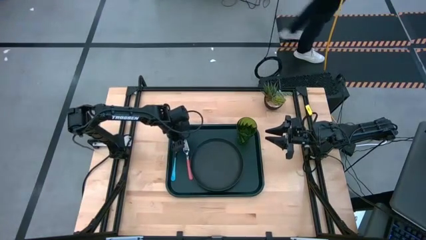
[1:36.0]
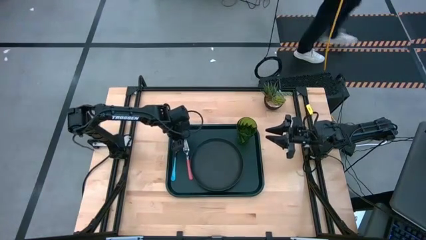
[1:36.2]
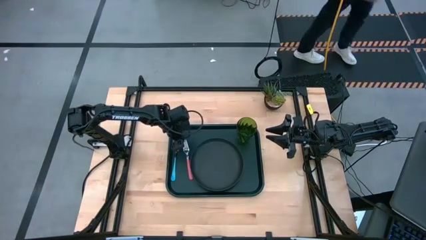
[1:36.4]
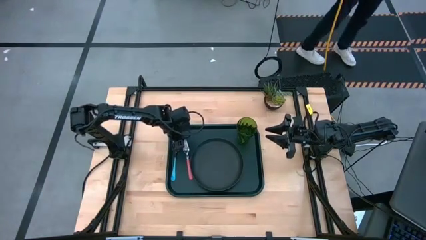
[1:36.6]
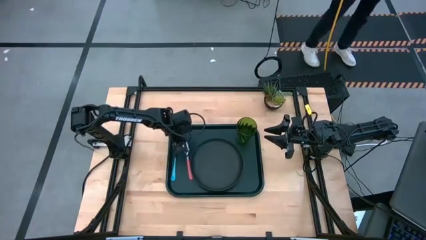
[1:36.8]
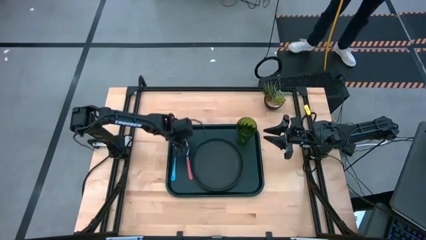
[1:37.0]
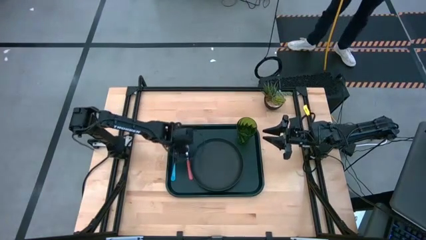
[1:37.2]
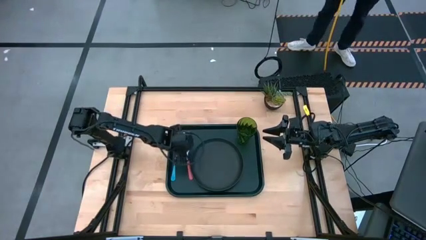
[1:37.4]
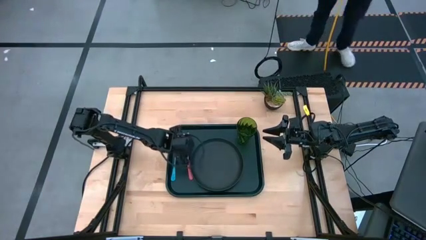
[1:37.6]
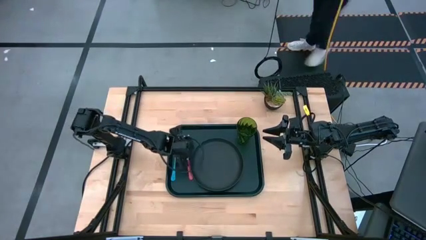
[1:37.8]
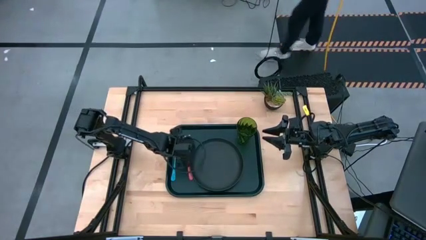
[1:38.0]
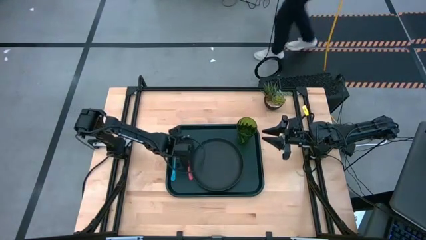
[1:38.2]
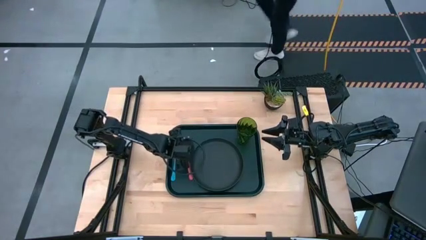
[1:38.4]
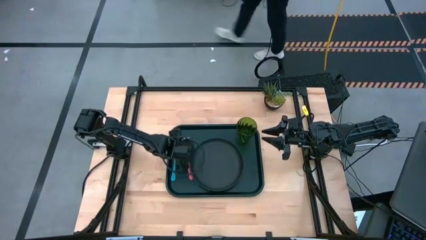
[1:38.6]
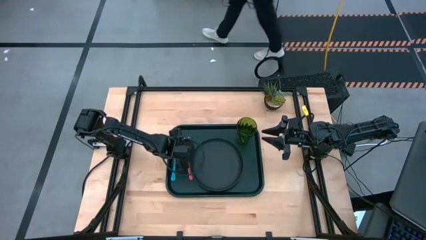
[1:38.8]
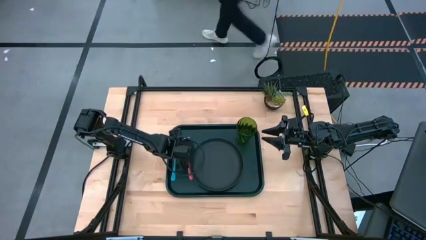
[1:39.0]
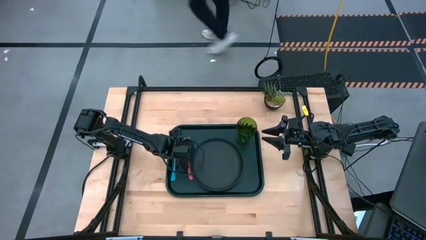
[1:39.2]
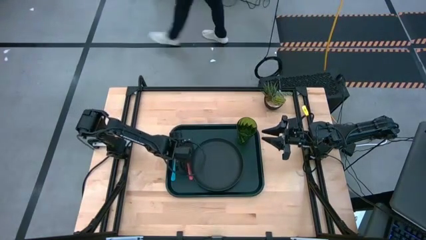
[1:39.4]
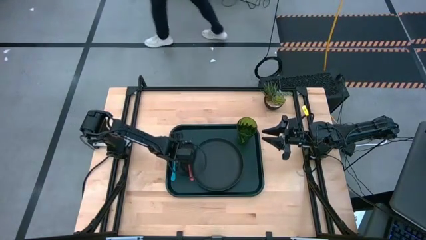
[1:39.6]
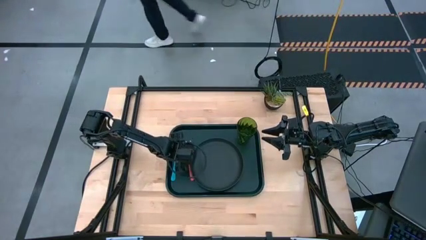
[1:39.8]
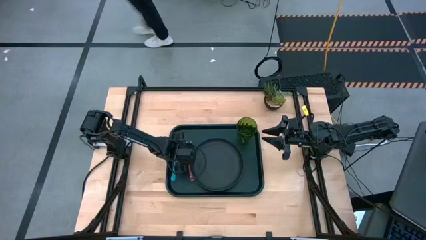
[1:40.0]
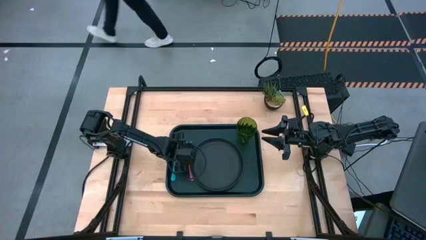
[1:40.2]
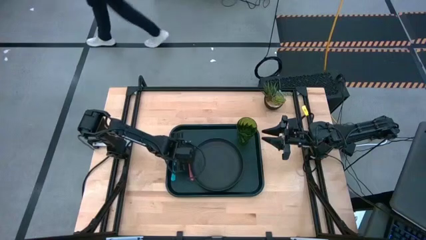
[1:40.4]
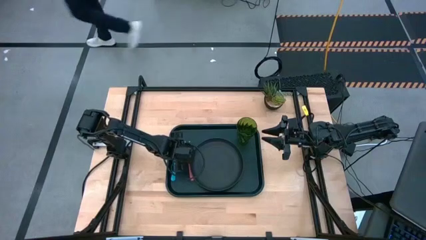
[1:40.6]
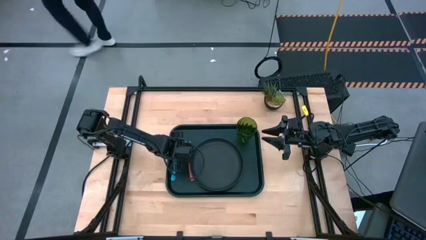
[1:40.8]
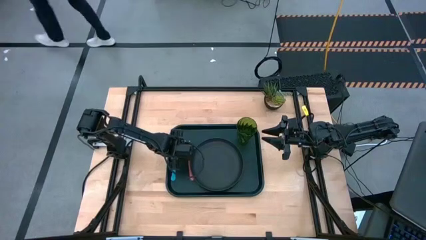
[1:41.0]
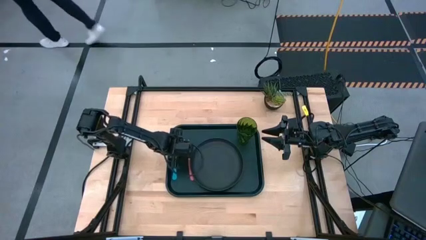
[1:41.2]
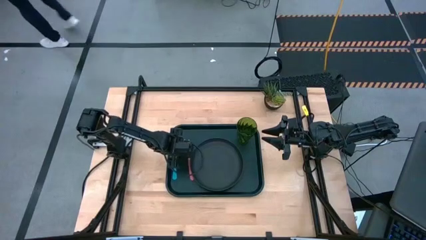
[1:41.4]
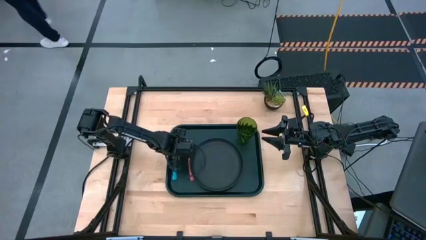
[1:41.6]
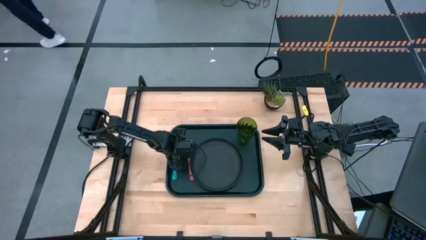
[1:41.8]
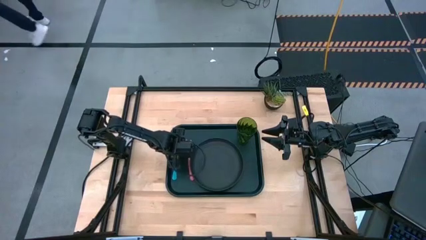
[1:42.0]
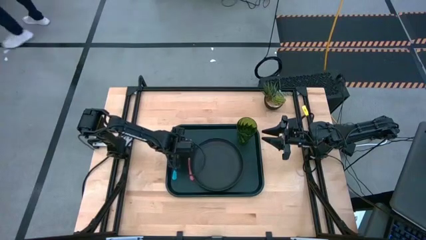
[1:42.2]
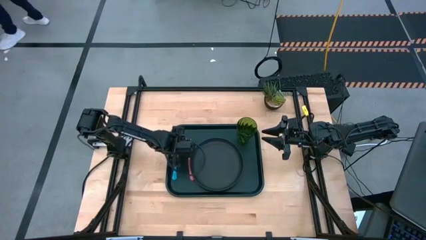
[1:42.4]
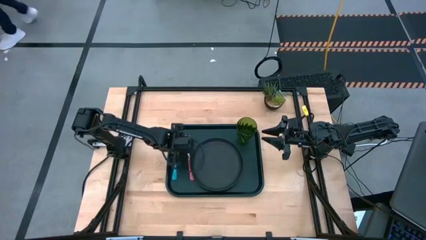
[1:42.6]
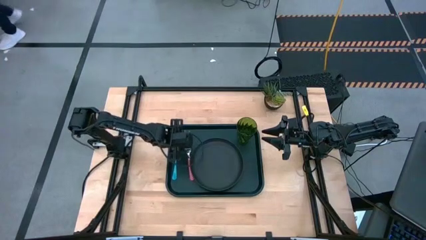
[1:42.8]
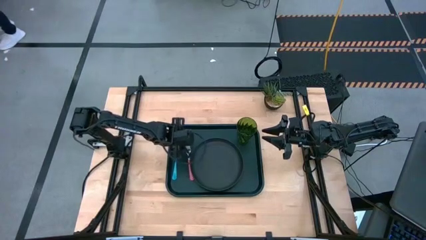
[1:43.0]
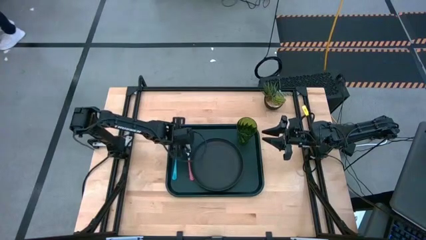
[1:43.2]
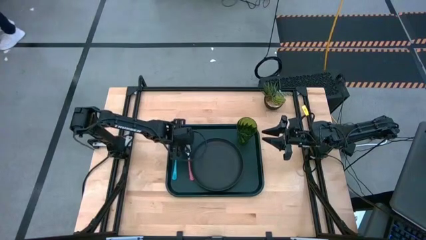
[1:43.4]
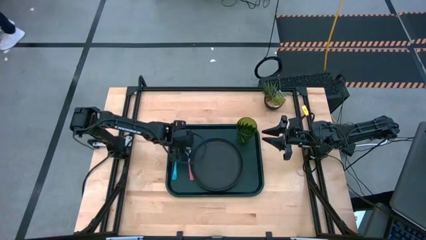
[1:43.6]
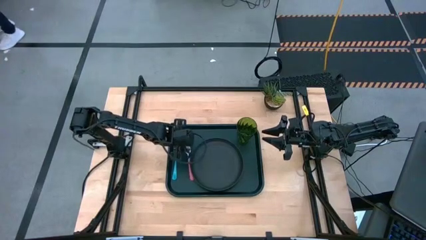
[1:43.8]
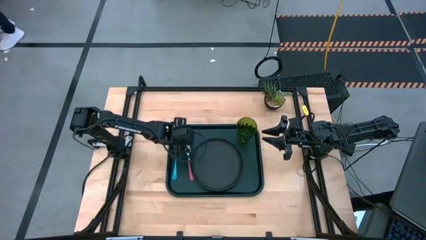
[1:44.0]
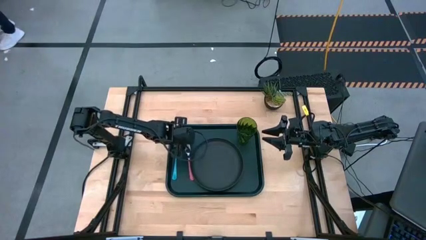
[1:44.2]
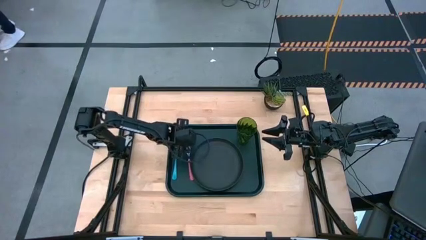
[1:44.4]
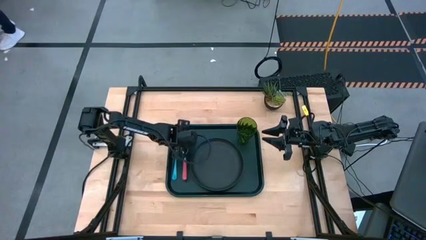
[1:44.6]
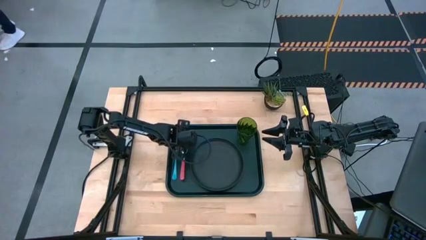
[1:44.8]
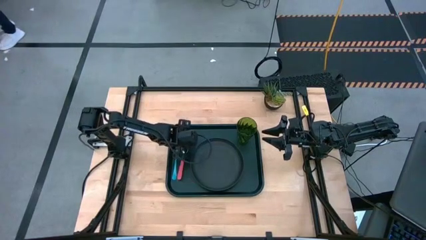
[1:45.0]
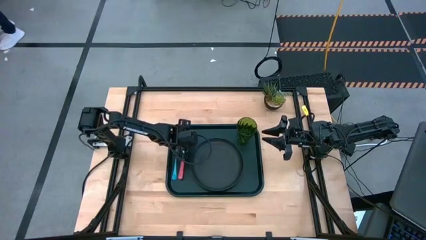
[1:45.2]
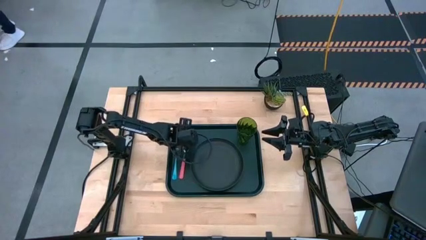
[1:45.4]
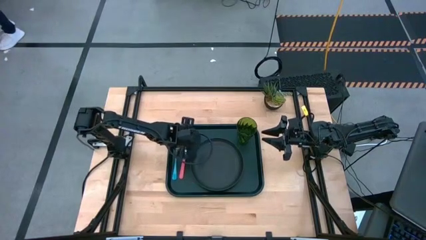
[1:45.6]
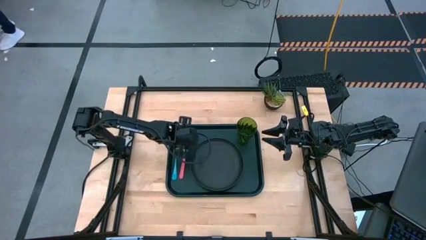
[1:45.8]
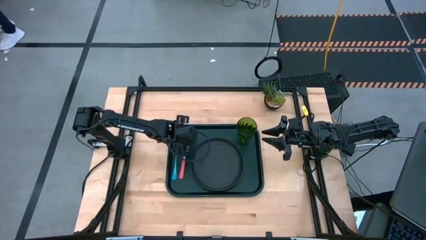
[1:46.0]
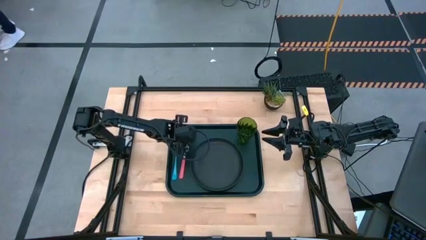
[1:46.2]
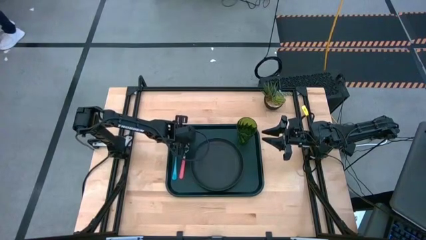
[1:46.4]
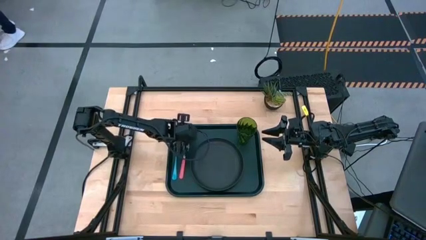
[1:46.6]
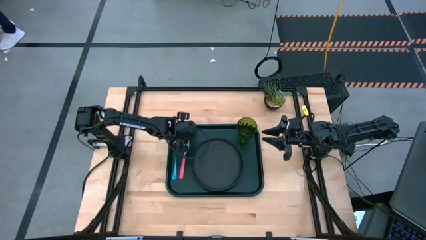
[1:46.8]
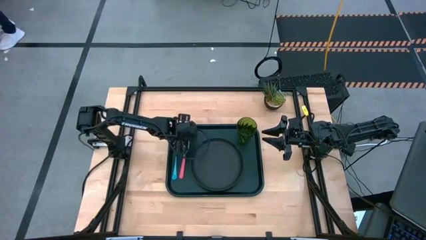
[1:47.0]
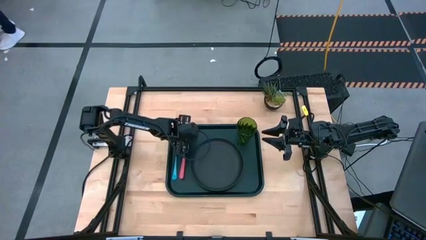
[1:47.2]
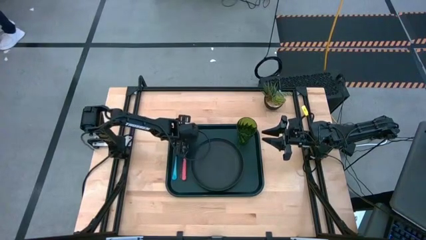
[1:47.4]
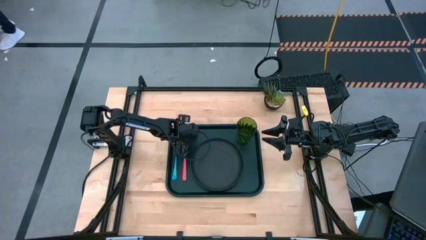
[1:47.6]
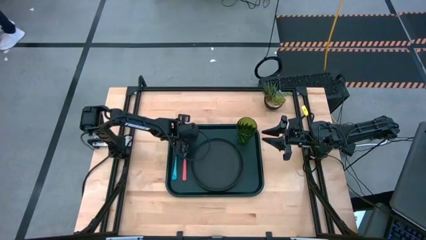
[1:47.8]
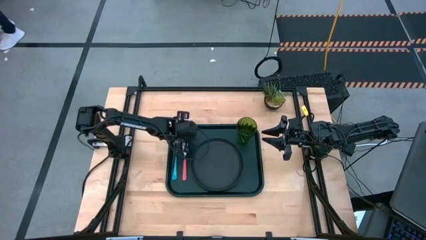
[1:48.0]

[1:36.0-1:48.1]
Task: Pick and place plate/cup/fork/spoon on tray
Adjust the pink fork

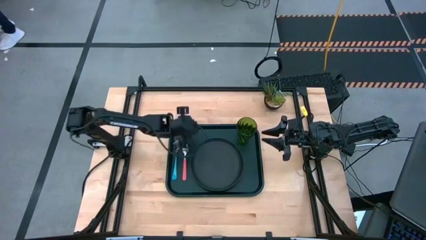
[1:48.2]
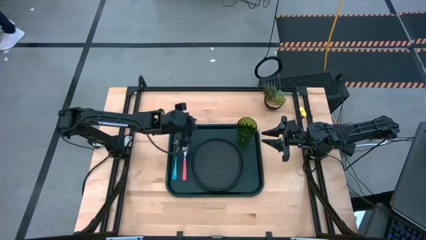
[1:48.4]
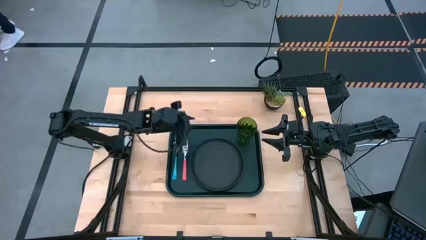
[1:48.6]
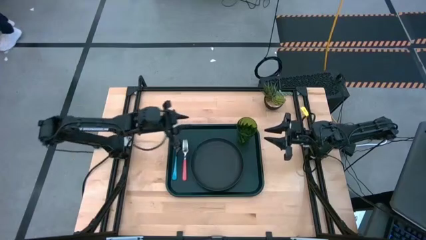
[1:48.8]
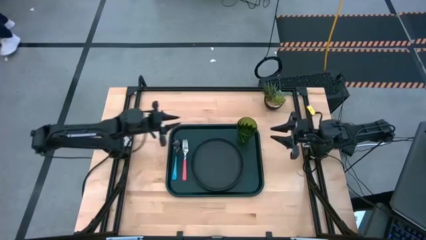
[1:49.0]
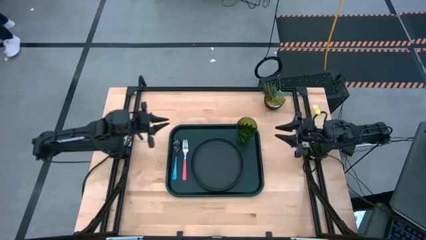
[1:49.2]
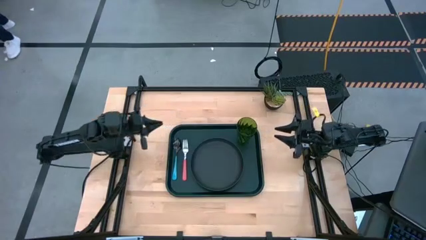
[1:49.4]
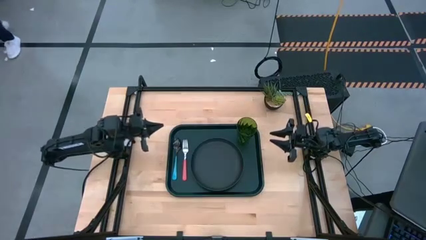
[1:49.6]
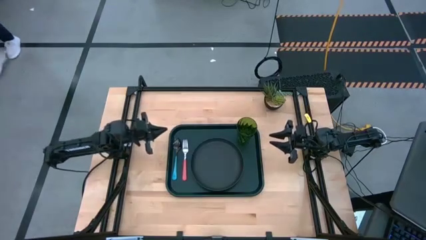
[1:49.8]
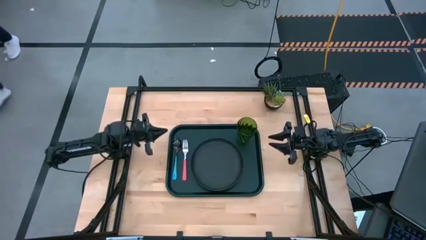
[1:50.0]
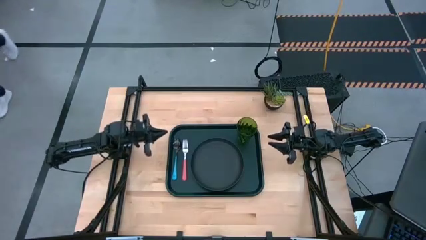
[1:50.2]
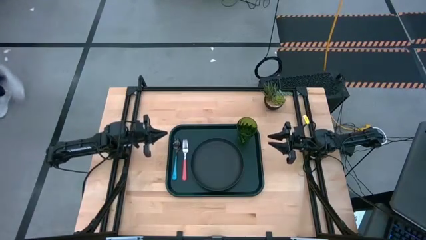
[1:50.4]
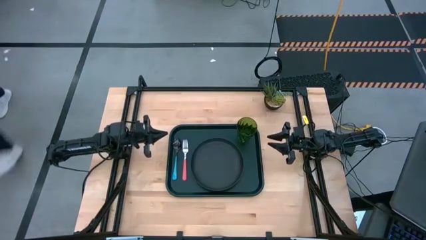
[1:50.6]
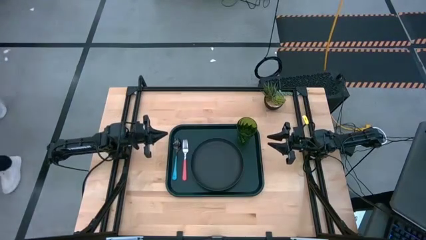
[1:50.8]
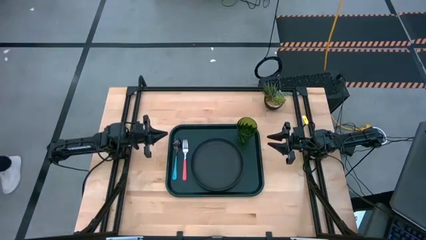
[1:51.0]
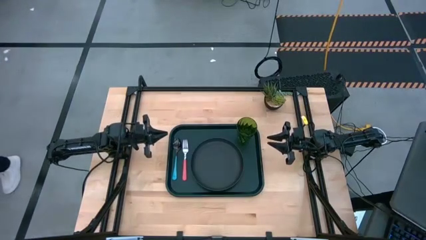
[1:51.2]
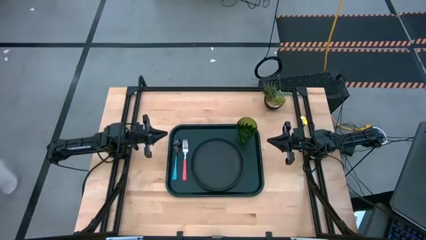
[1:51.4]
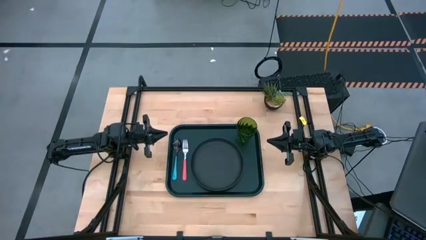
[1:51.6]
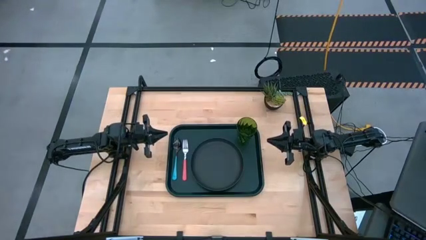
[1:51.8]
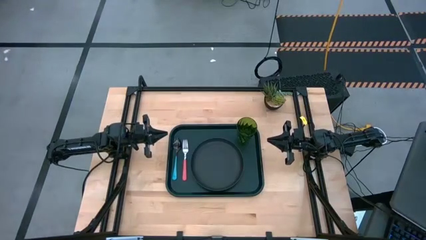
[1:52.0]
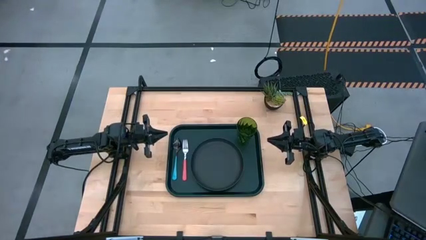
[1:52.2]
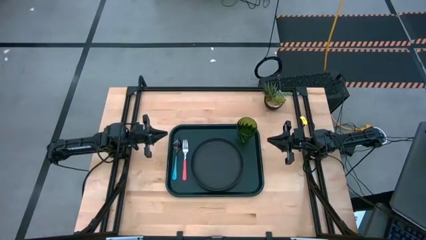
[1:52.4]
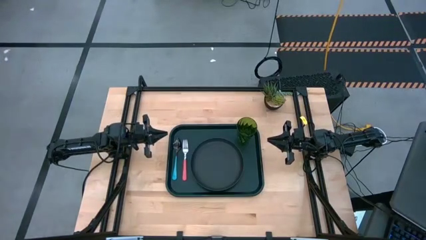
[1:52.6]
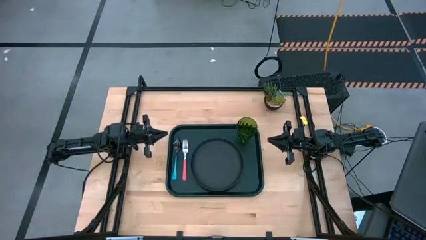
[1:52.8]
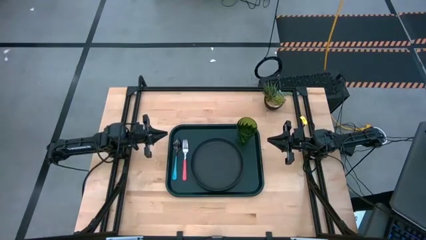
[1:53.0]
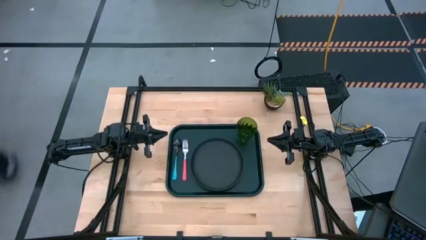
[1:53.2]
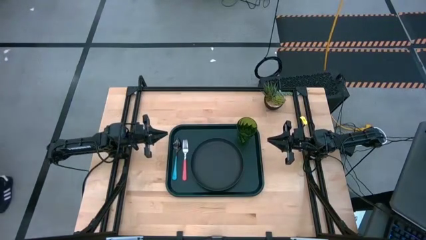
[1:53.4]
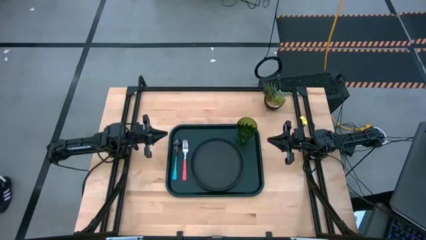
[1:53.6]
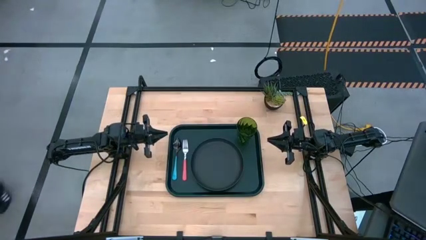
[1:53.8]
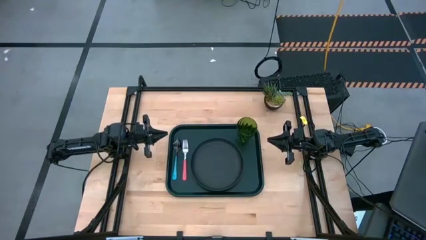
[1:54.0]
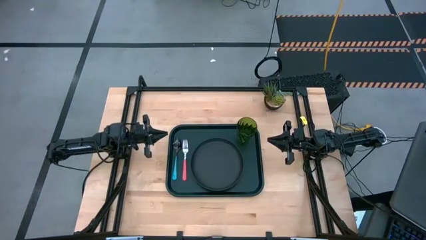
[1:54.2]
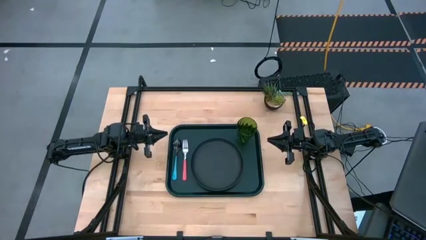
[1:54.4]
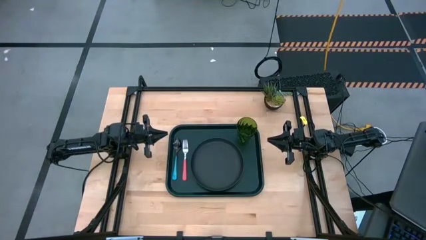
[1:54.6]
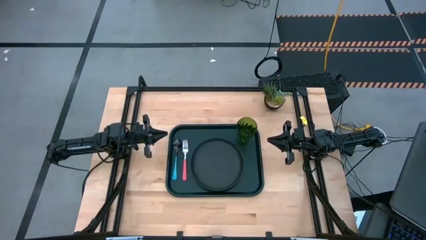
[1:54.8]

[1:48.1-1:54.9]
Return to Home Position
